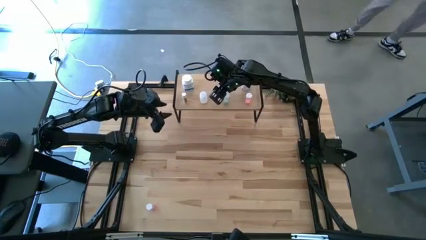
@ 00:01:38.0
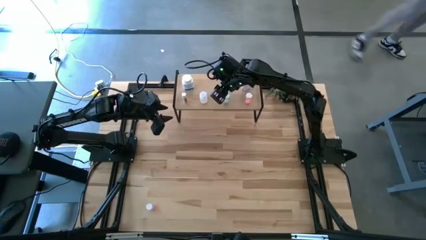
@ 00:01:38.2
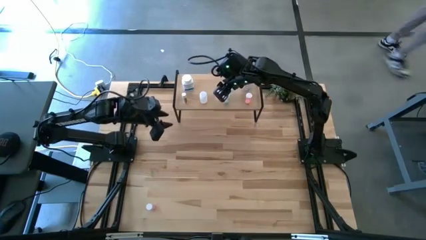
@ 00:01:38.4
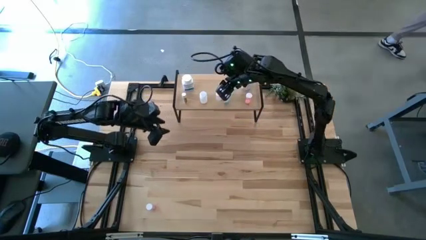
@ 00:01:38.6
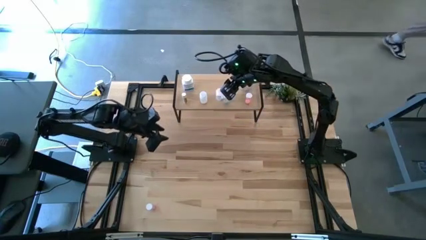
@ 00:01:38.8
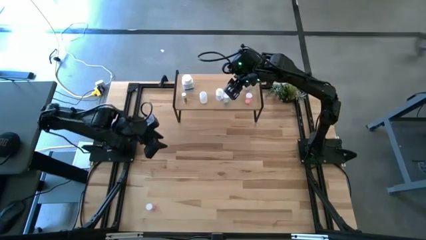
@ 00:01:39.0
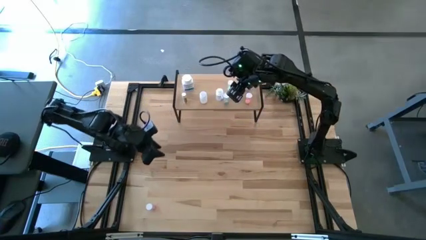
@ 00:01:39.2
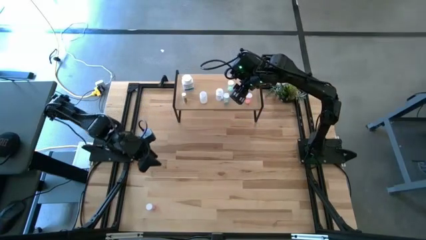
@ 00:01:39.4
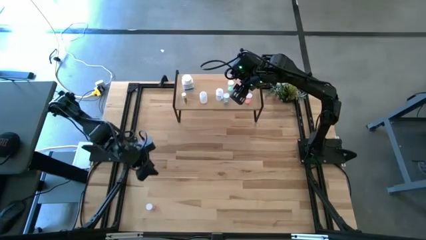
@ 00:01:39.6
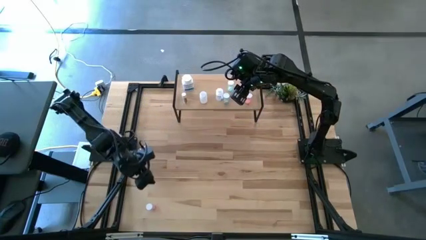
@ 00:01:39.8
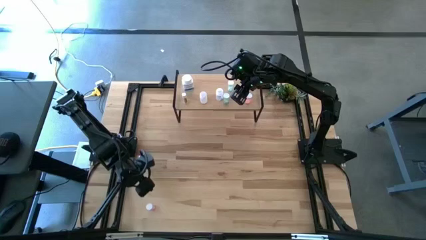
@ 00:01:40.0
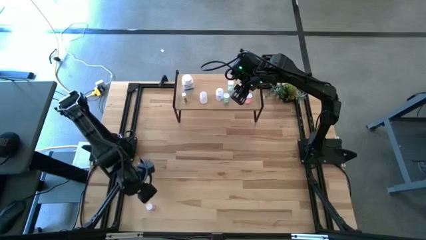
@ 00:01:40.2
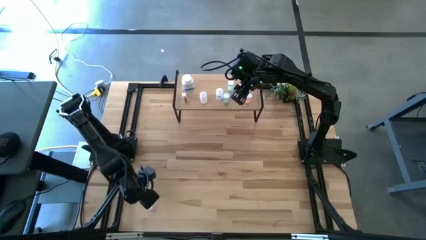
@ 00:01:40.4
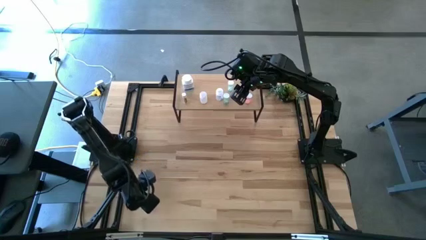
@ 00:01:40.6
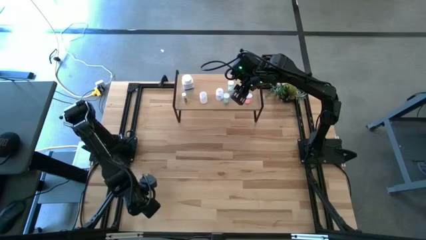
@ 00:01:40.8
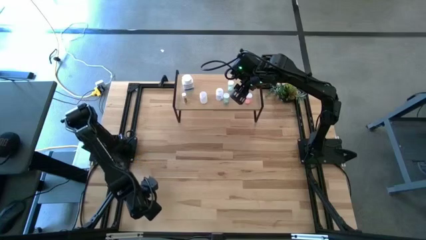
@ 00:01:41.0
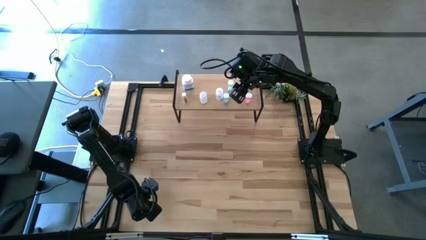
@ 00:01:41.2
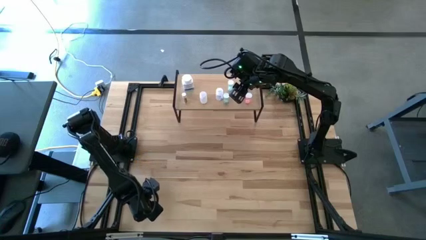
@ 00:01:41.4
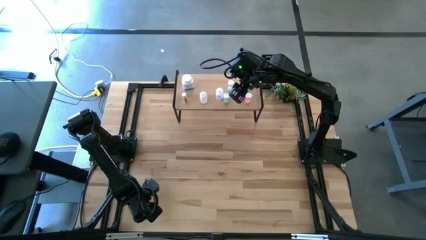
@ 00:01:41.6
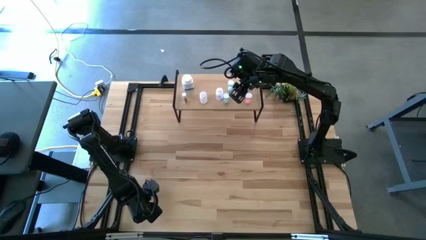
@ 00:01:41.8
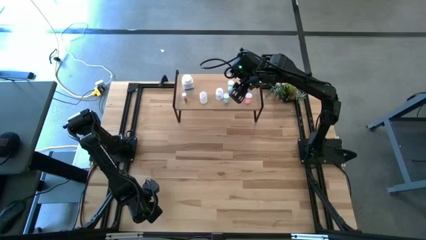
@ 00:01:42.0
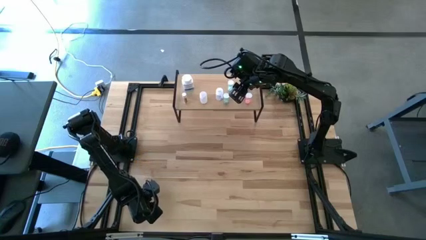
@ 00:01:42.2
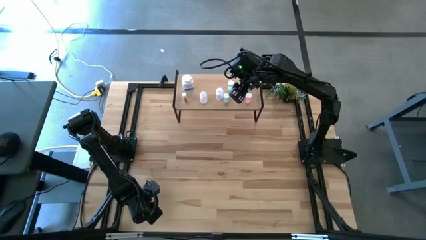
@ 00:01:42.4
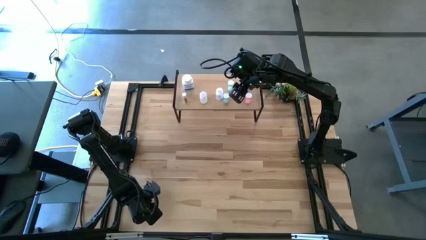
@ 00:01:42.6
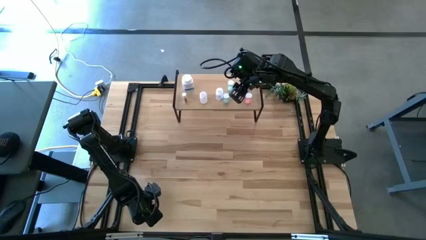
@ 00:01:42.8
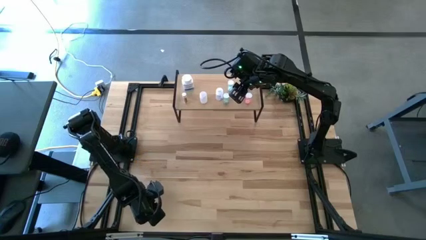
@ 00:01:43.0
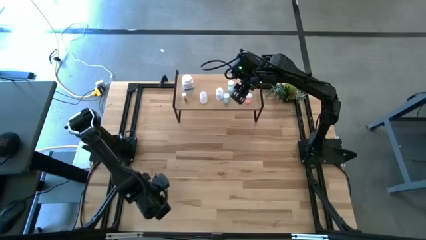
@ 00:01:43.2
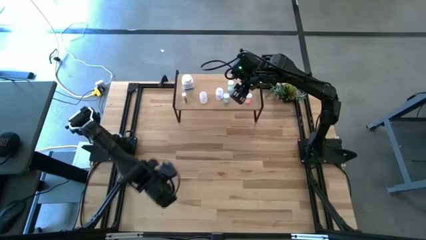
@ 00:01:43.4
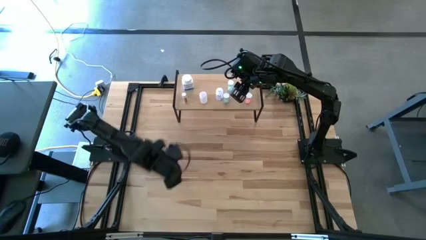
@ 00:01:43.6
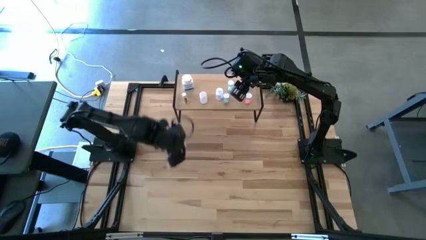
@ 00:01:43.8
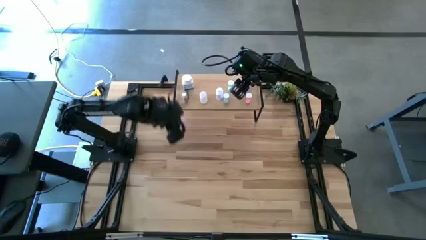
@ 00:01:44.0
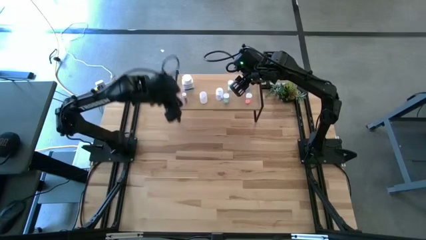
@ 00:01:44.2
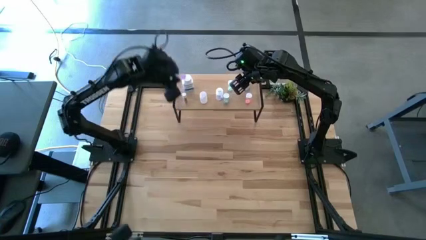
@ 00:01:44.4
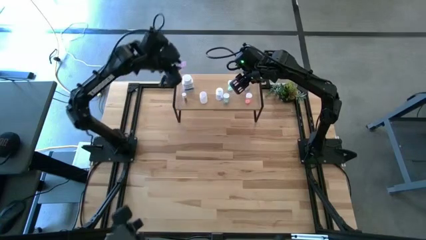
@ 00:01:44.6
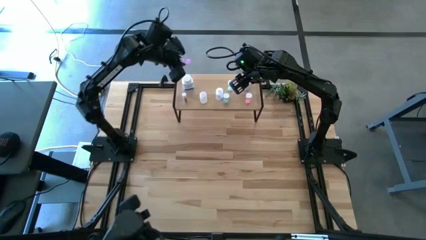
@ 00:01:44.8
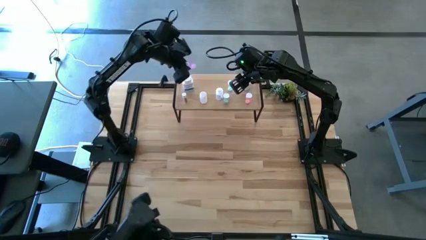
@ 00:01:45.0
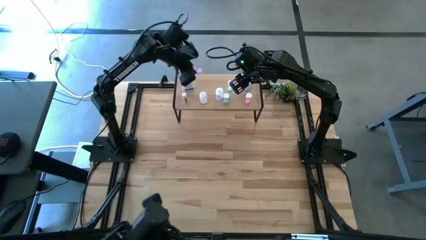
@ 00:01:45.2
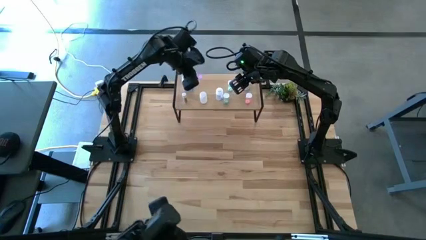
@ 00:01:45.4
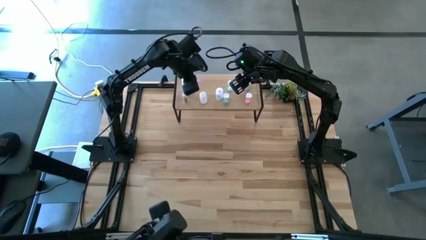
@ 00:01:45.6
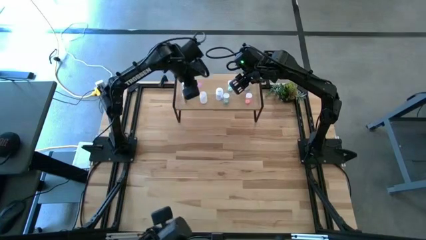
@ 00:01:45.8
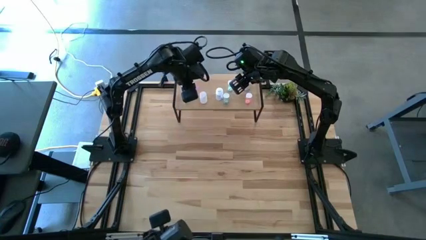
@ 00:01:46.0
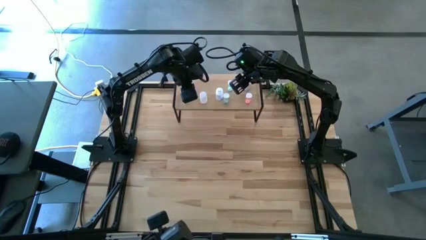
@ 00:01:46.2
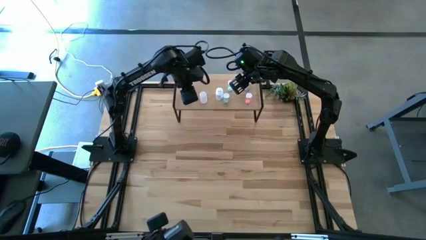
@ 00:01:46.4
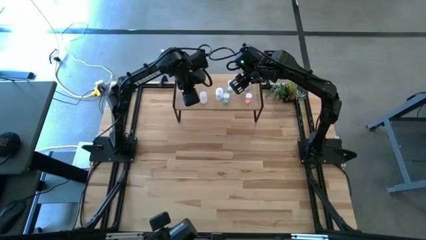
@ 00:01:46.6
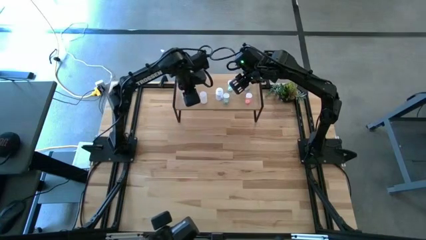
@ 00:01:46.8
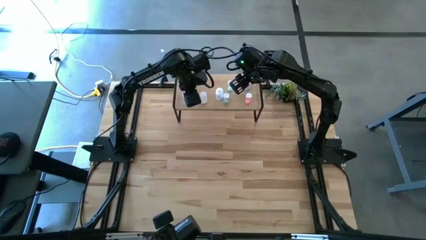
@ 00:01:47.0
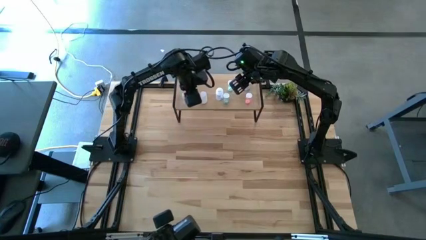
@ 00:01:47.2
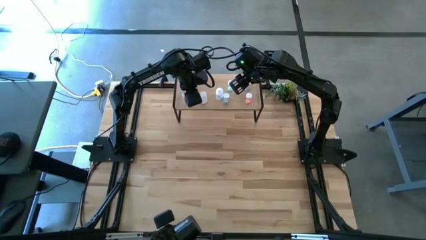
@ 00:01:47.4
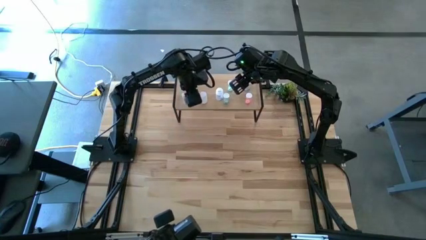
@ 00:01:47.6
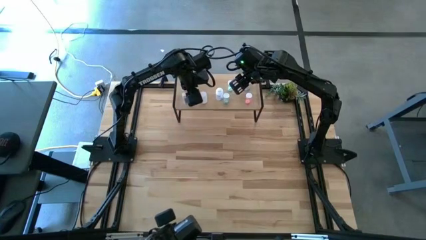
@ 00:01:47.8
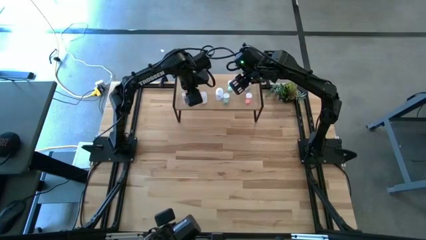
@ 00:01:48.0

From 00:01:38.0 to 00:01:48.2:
Task: Pick and place medicine bottles onto shelf by color
Put the purple pill bottle on the shelf

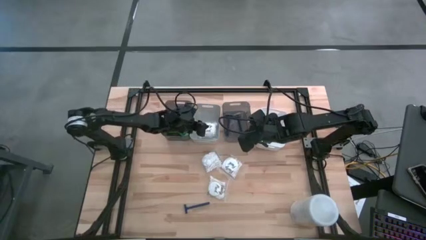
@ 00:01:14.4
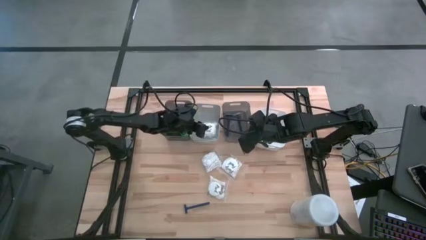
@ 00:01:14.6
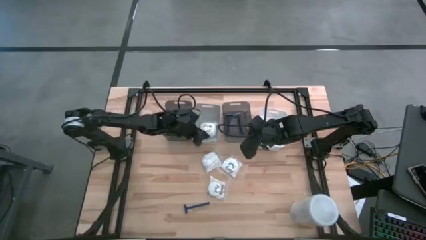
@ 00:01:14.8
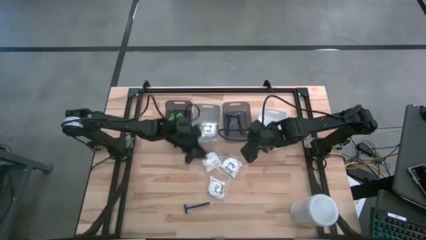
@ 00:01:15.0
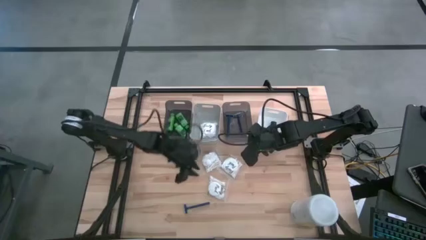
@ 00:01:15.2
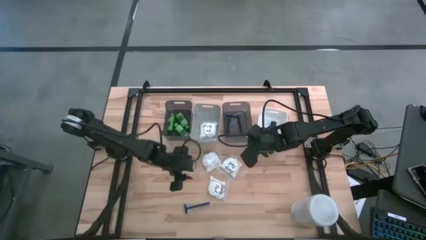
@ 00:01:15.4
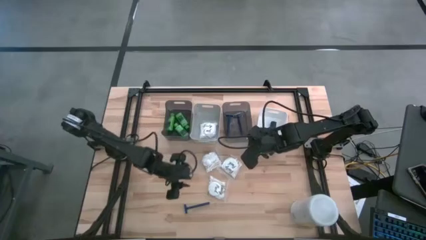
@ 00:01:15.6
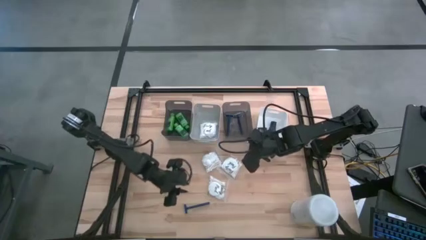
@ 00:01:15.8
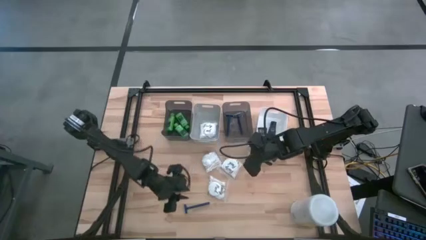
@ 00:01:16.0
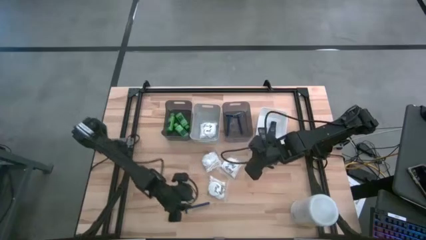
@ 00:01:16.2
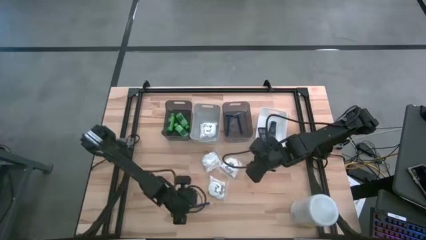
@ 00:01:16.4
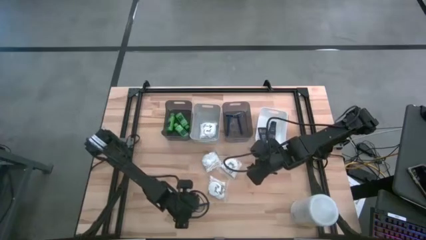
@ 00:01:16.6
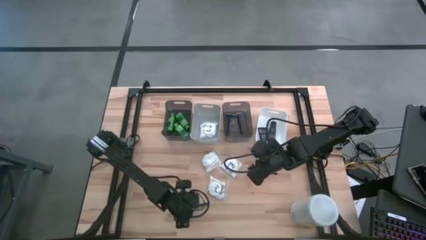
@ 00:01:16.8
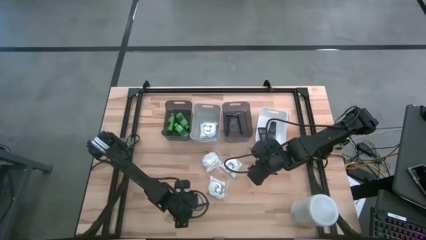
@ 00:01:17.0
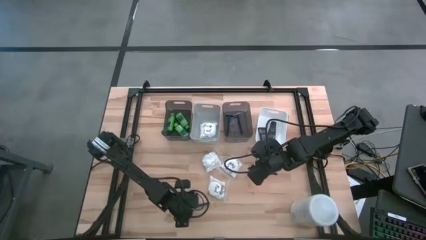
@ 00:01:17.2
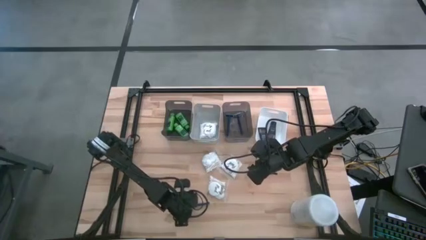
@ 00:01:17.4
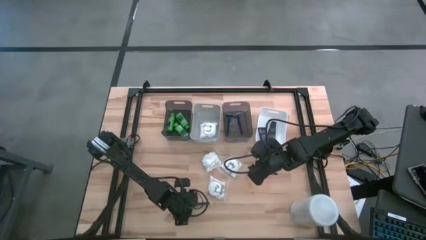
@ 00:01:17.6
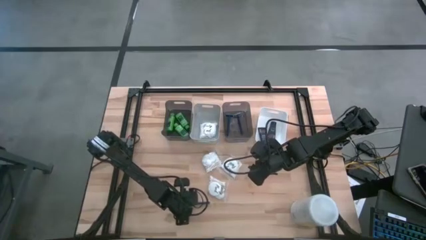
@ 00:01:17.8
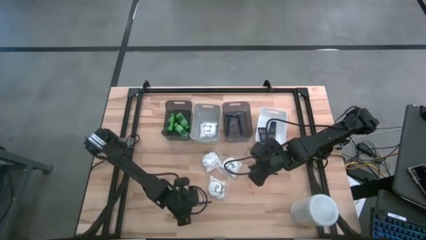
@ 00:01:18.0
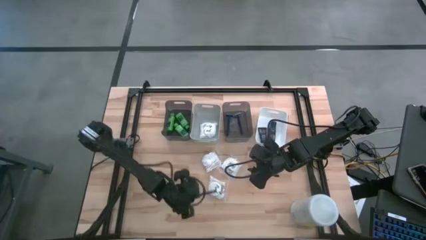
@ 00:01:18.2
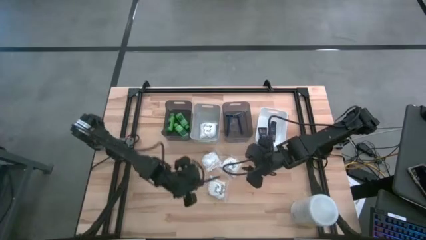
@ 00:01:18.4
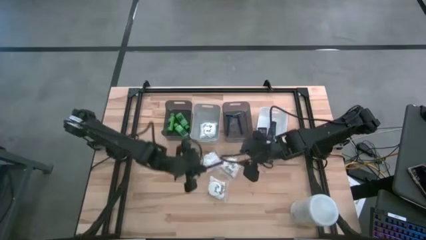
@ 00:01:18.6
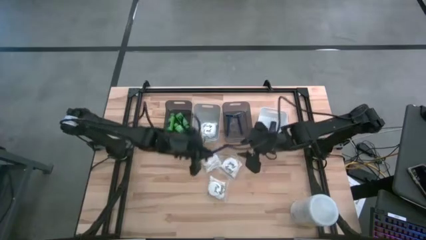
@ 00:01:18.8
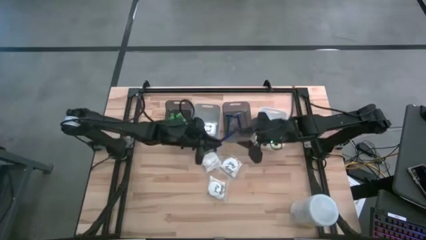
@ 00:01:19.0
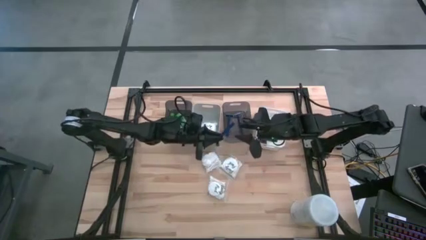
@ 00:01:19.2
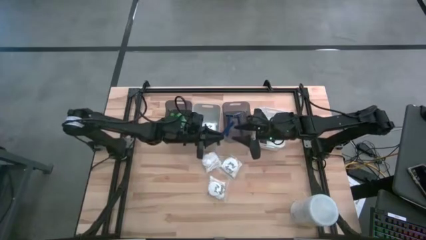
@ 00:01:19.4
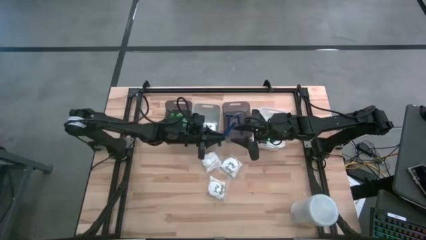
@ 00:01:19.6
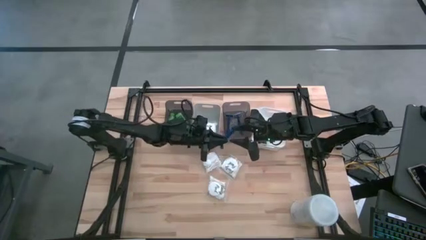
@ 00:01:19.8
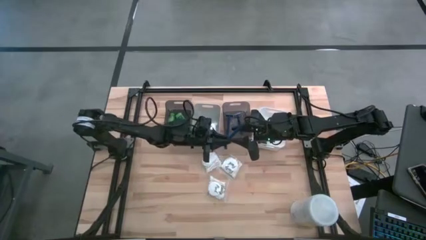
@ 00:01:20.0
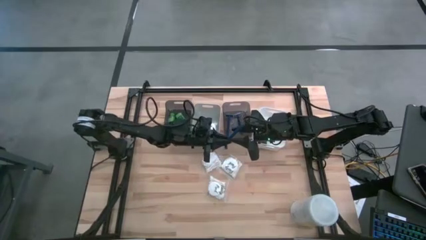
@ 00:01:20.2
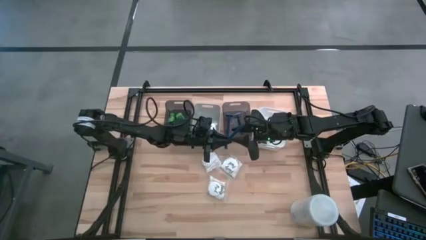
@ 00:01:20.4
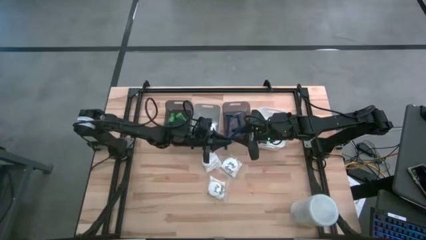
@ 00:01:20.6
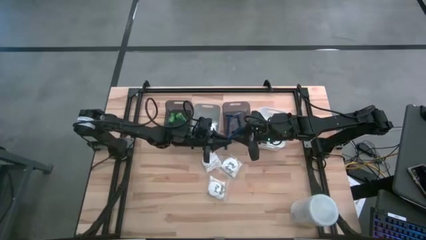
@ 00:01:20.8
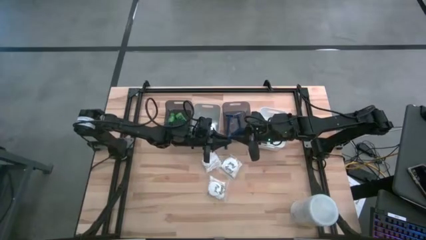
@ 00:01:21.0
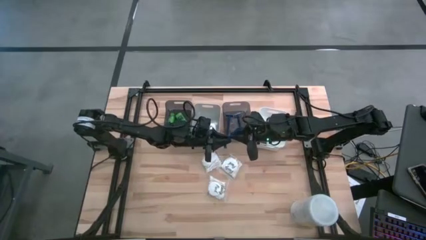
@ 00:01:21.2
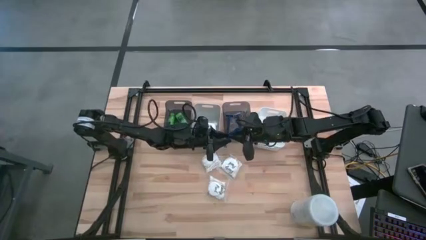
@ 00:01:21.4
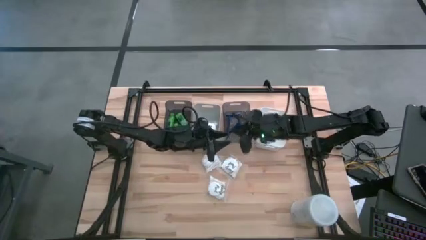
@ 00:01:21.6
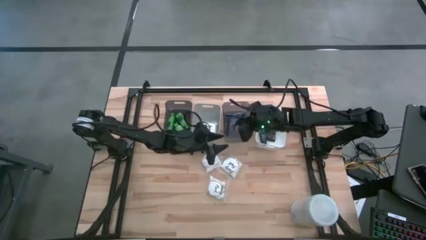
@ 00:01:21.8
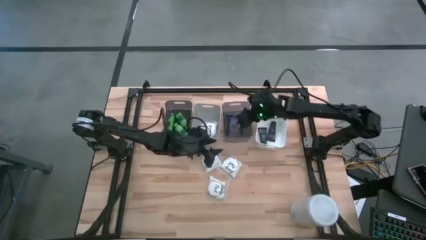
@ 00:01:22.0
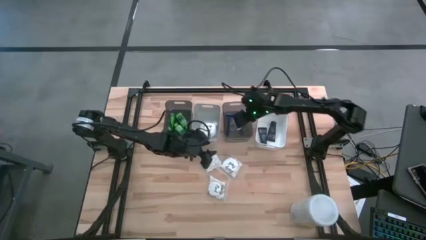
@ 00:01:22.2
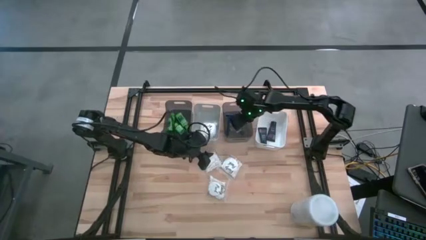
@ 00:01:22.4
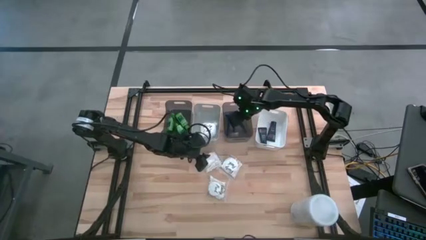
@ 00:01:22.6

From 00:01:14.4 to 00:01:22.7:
Task: Pick & Place Travel size toiletries
Put the blue razor into the right black bin
